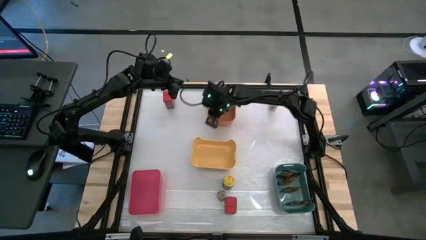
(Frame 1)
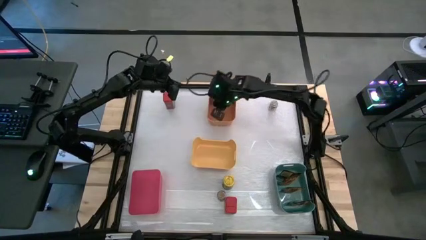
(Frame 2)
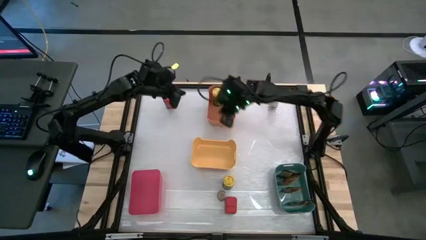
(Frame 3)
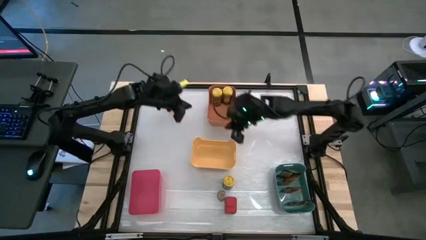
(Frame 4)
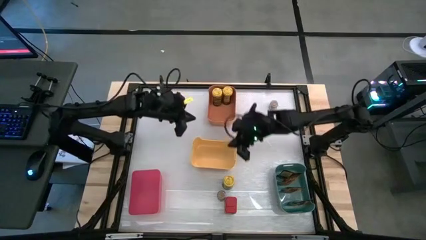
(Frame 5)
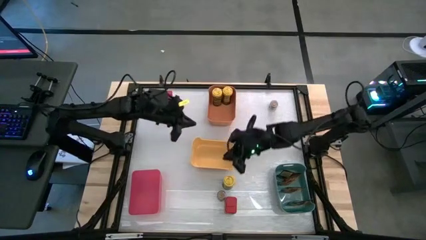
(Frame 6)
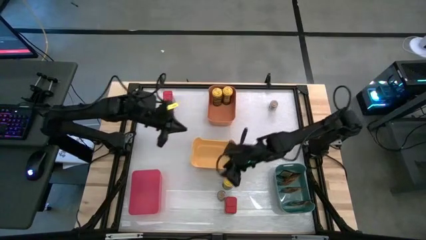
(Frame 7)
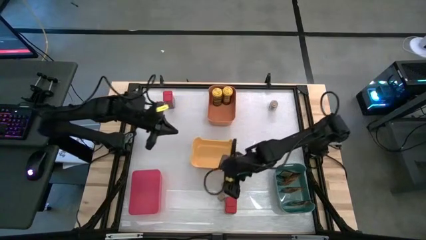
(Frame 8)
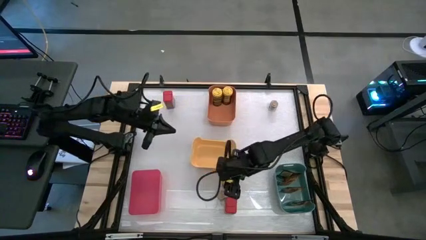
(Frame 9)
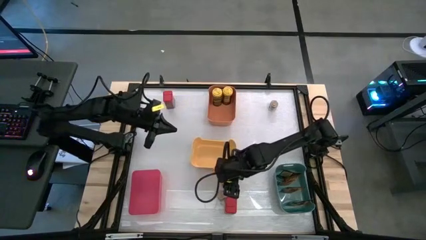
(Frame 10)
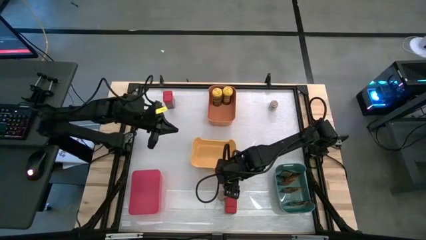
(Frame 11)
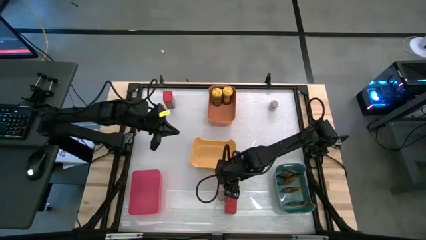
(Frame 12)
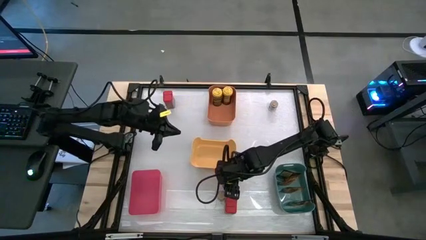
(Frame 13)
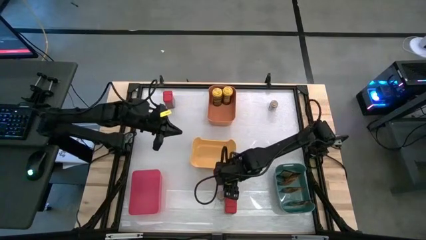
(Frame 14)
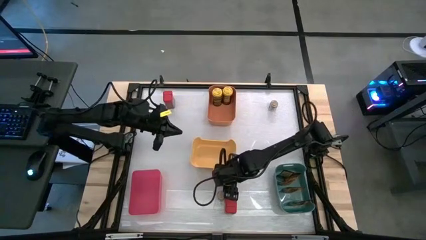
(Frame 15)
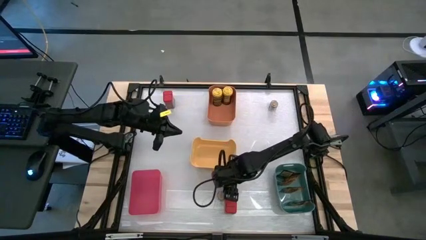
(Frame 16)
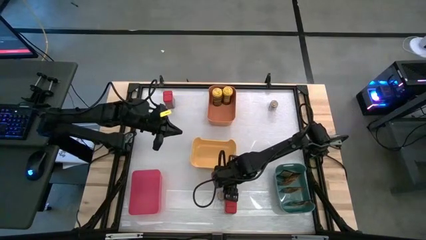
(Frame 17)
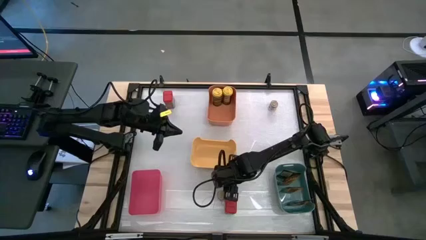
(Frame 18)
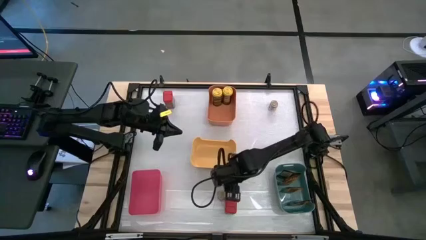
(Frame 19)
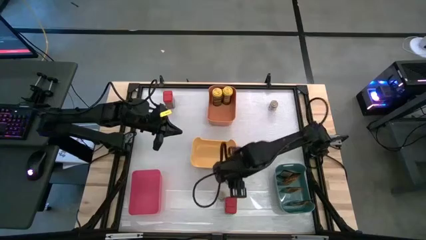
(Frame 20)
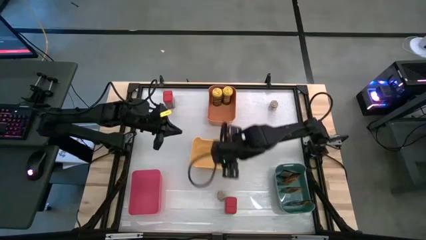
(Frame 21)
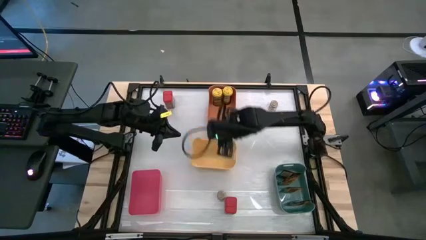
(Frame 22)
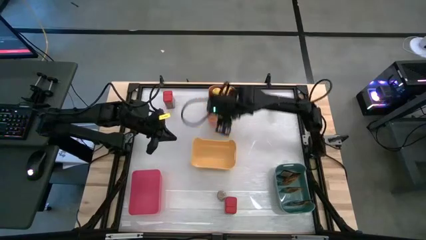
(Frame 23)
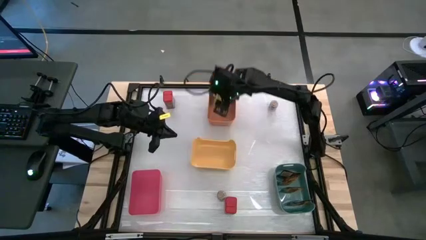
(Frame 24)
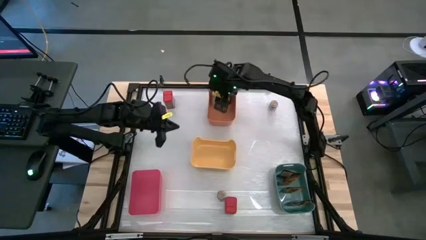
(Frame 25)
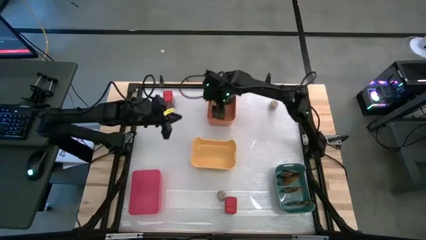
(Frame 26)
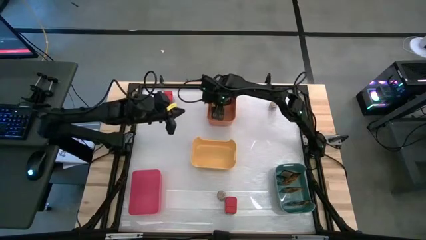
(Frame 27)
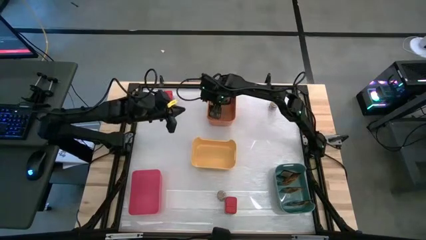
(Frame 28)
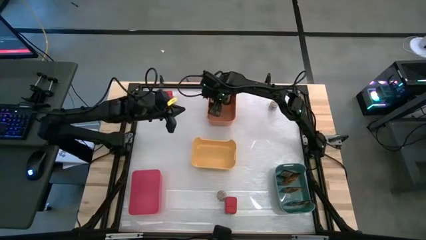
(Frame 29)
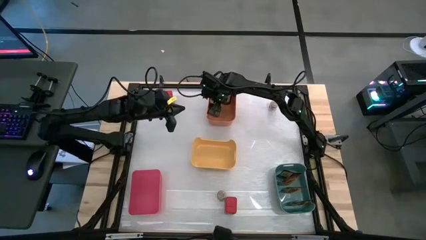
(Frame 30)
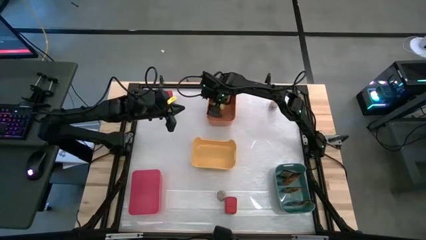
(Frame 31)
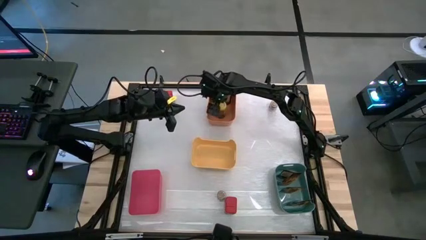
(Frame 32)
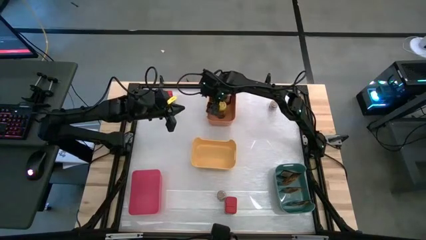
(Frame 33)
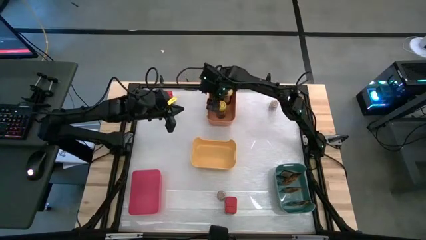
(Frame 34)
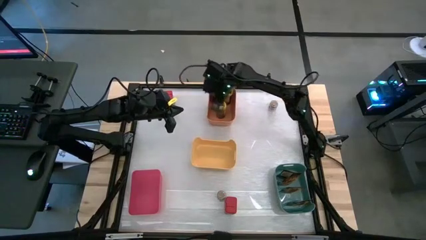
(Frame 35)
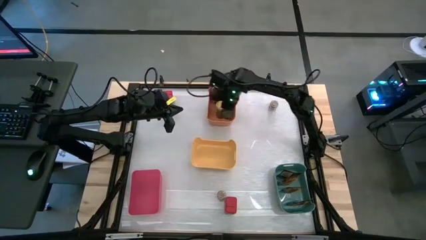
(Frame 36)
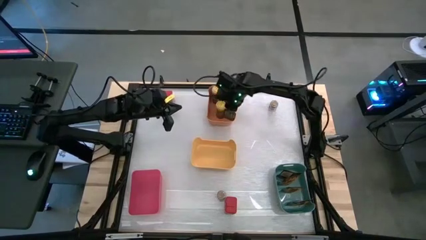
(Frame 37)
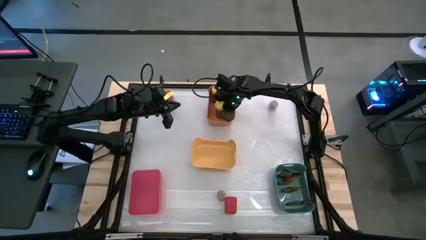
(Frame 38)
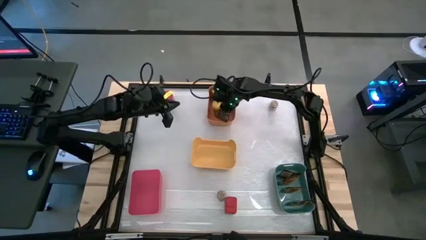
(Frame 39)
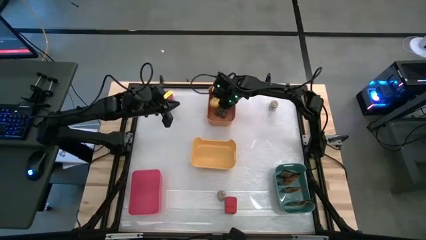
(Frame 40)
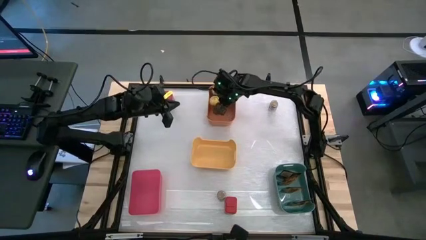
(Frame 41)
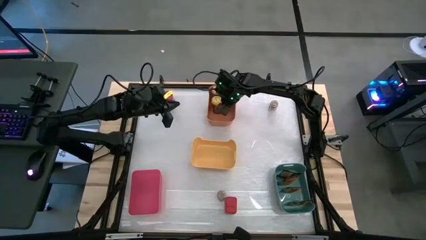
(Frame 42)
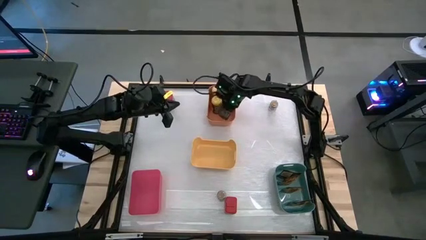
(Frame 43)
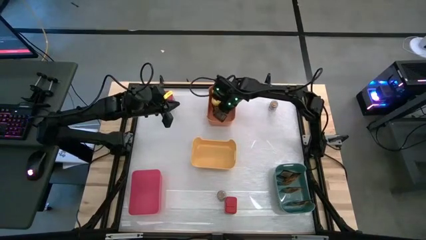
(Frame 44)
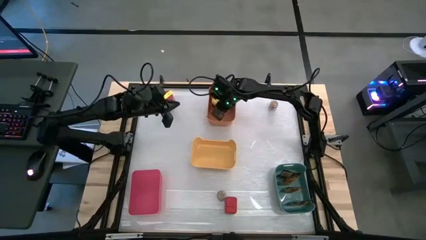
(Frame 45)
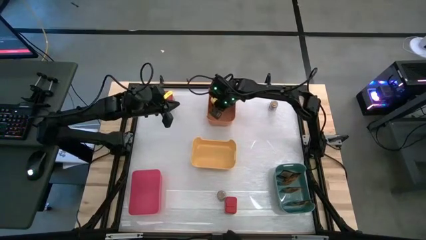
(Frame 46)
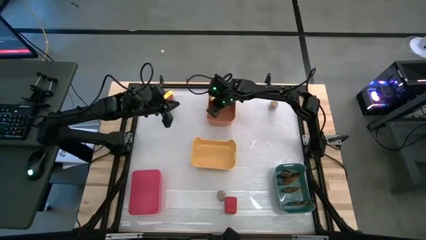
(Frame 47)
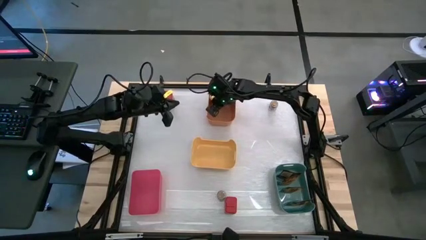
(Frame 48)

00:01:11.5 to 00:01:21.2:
Task: Sort spices by type
Put the yellow seasoning bottle into the orange bin

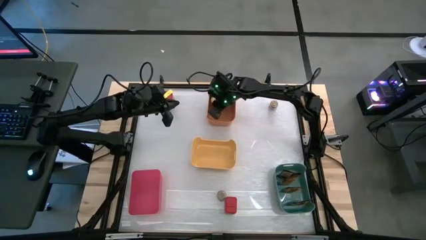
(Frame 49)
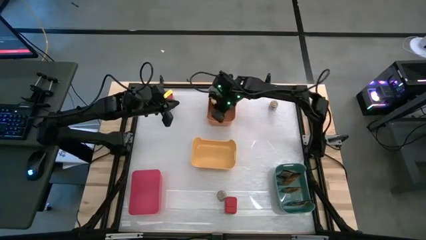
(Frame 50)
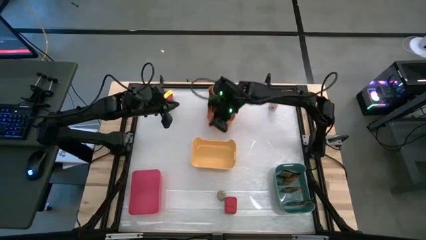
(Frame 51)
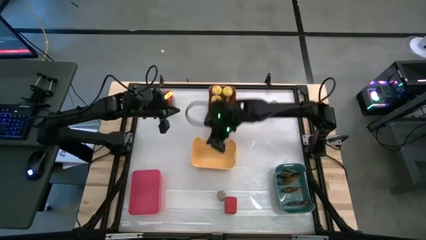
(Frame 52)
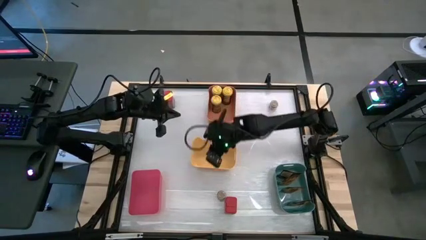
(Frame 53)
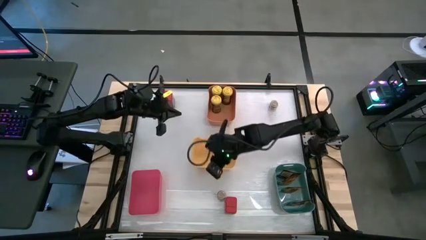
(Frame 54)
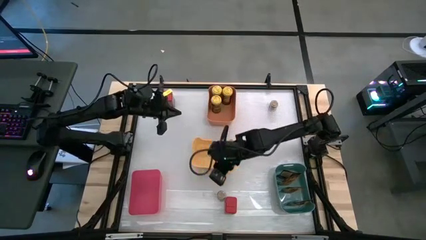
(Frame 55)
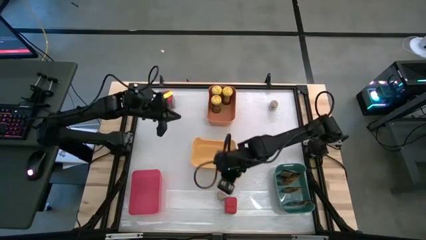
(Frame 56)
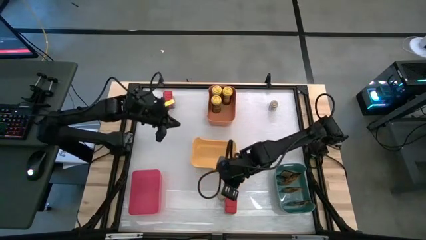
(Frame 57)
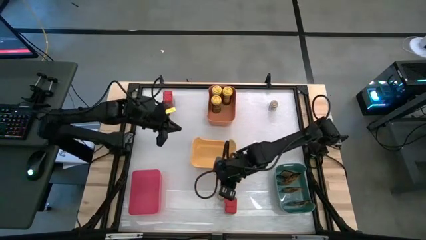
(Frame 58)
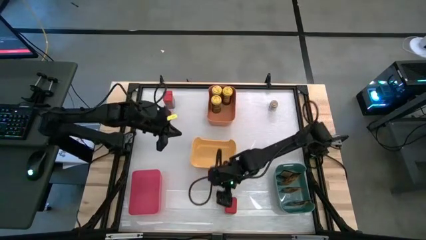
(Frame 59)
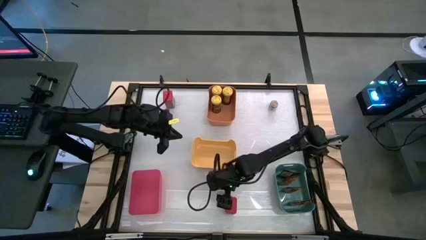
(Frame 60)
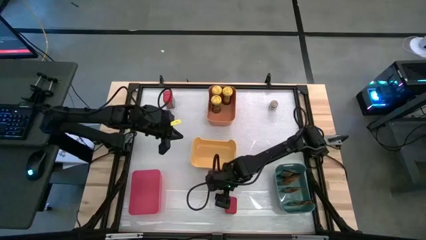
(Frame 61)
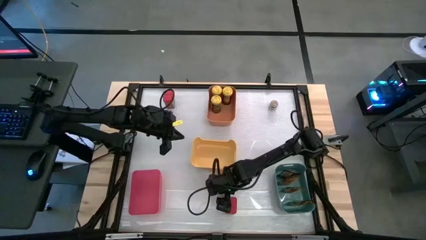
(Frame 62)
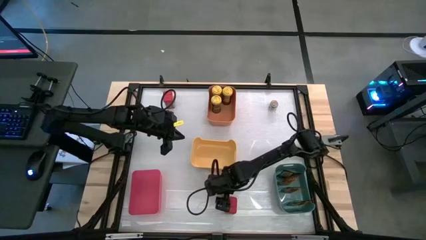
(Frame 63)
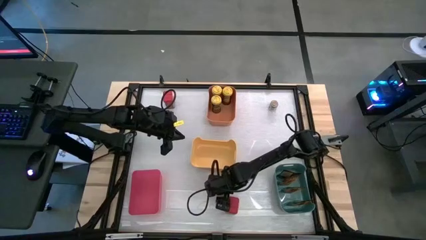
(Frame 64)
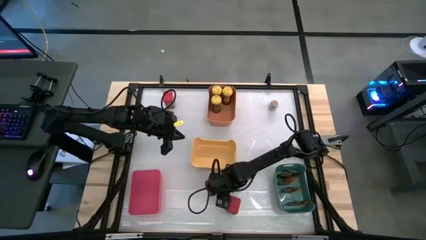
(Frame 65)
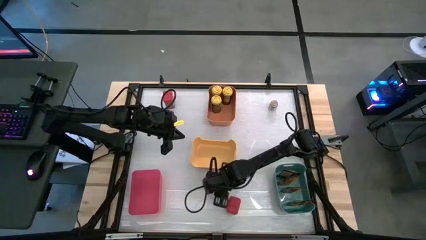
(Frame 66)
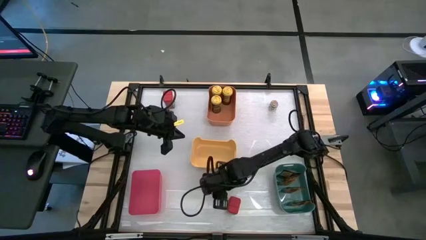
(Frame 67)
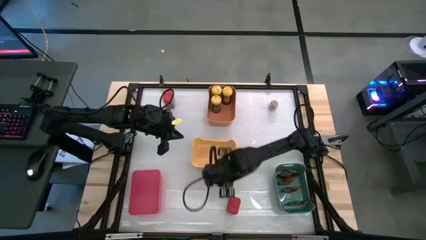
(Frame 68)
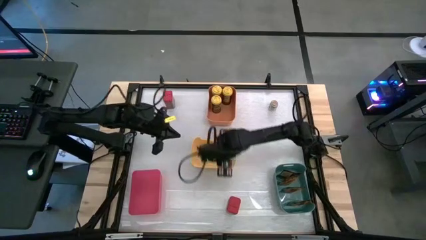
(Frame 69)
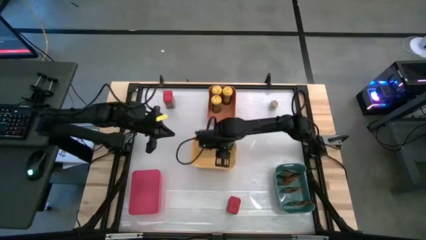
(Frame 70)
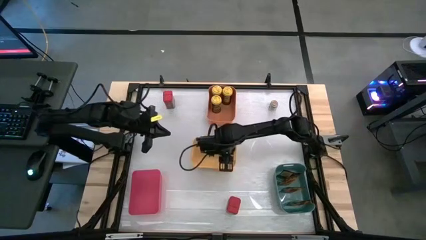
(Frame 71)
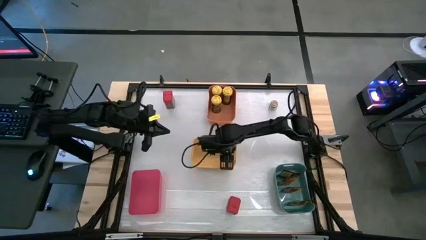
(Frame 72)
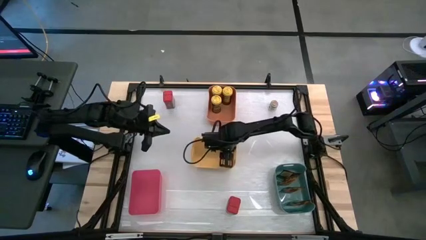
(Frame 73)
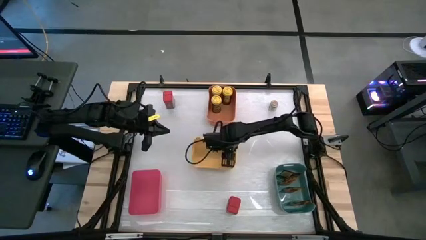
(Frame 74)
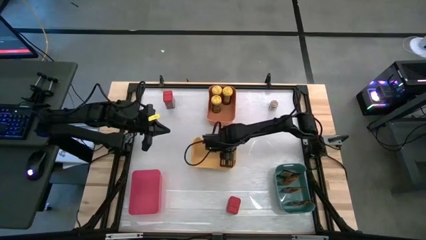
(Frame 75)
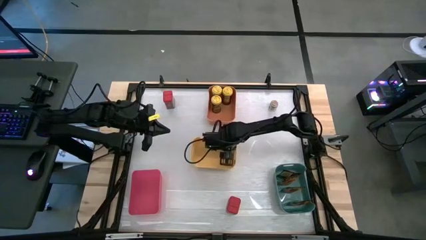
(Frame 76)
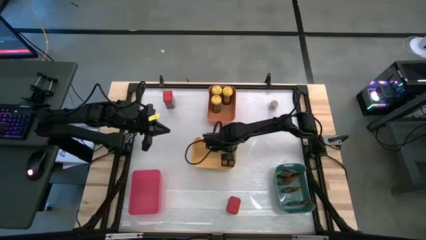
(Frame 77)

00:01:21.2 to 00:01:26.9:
Put the bottom brown seasoning bottle into the yellow bin
